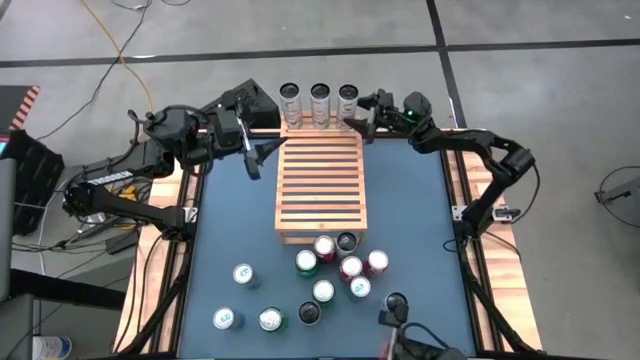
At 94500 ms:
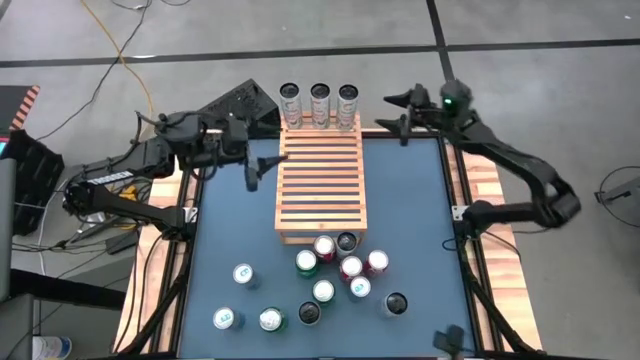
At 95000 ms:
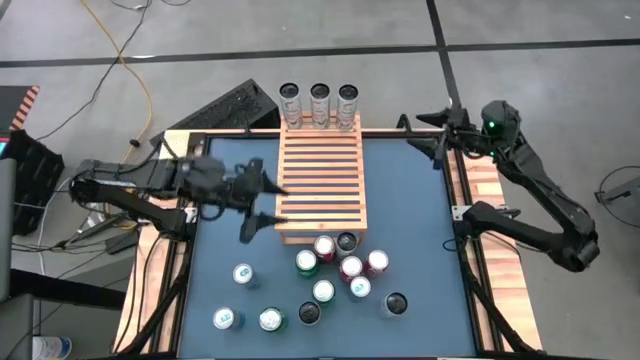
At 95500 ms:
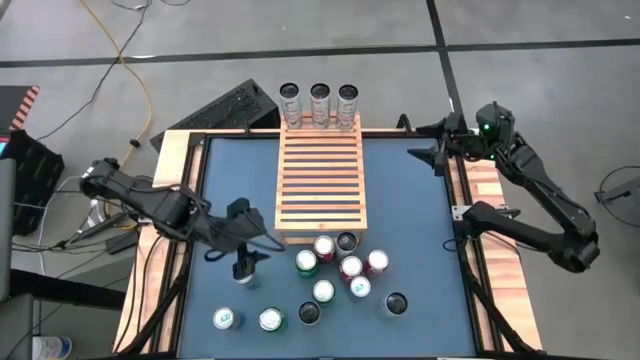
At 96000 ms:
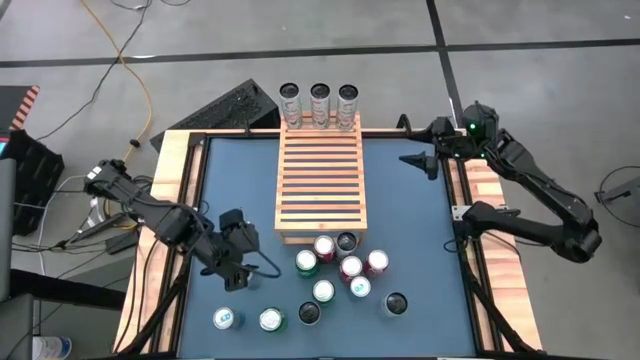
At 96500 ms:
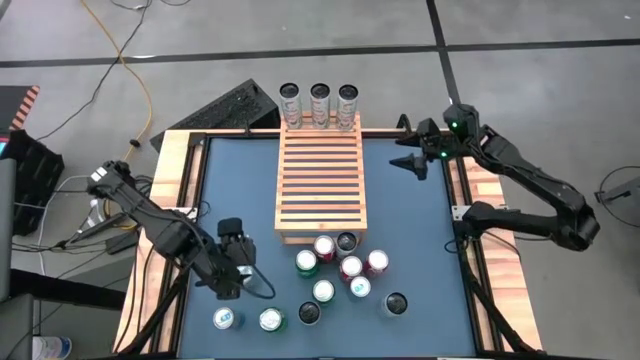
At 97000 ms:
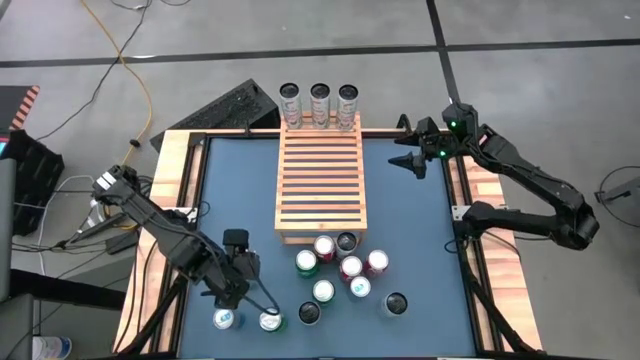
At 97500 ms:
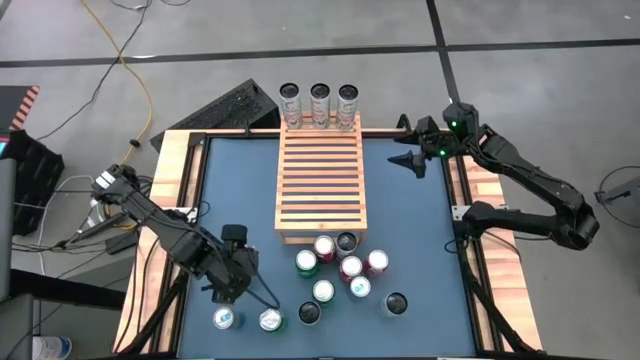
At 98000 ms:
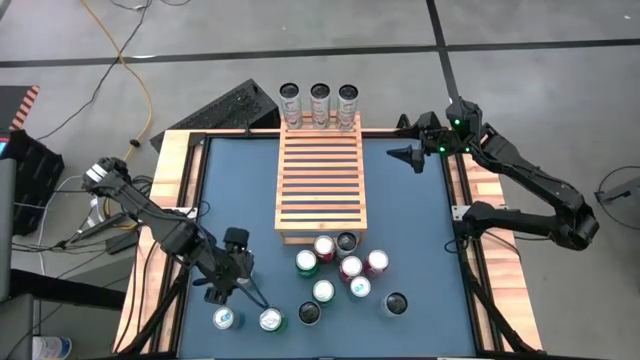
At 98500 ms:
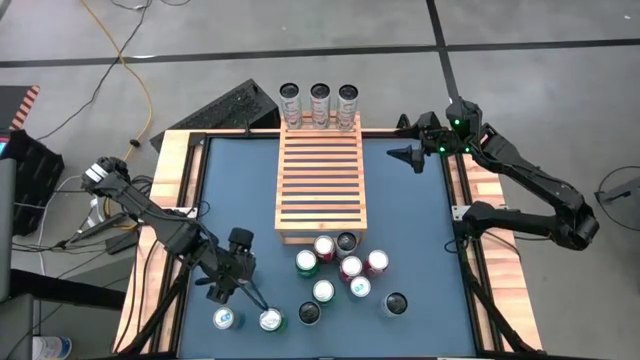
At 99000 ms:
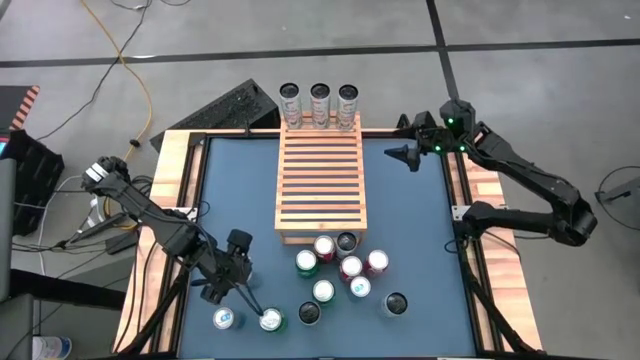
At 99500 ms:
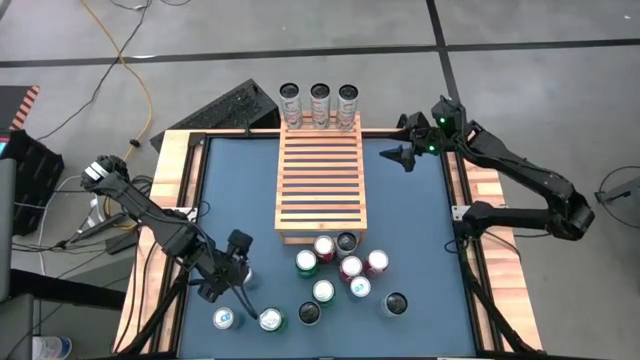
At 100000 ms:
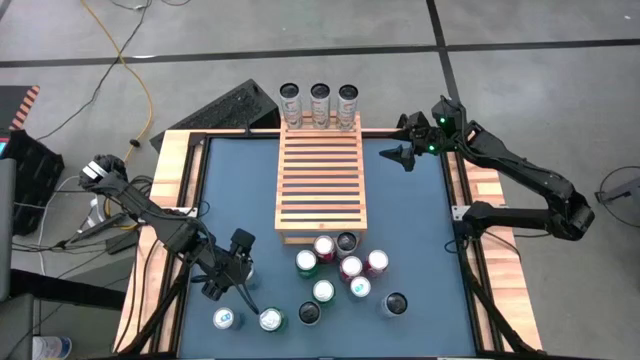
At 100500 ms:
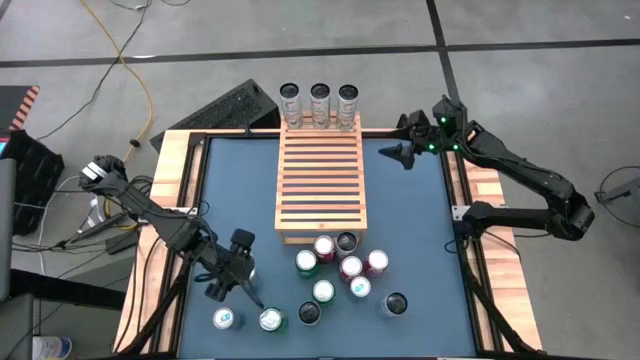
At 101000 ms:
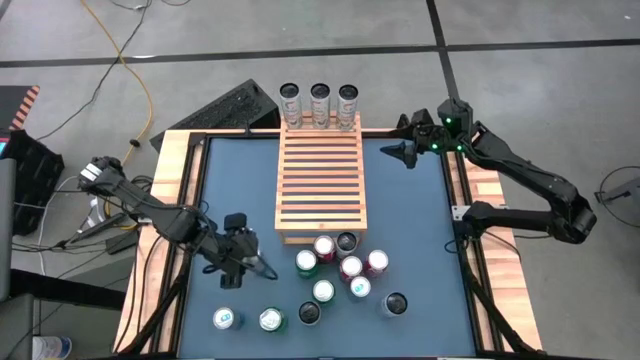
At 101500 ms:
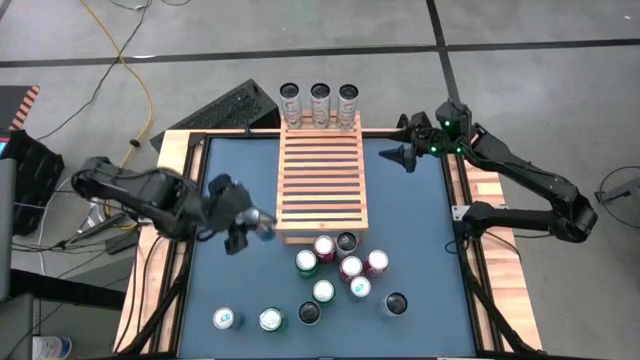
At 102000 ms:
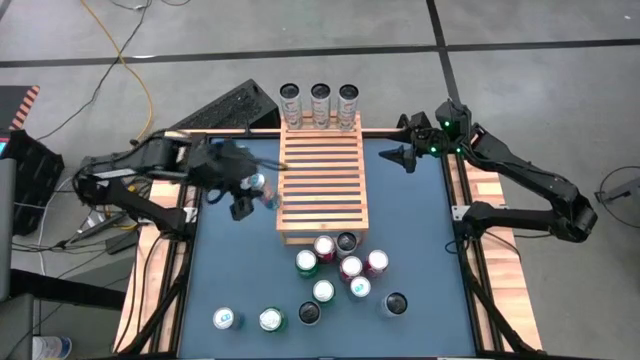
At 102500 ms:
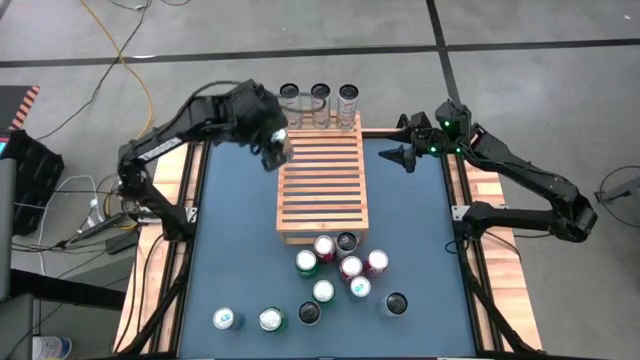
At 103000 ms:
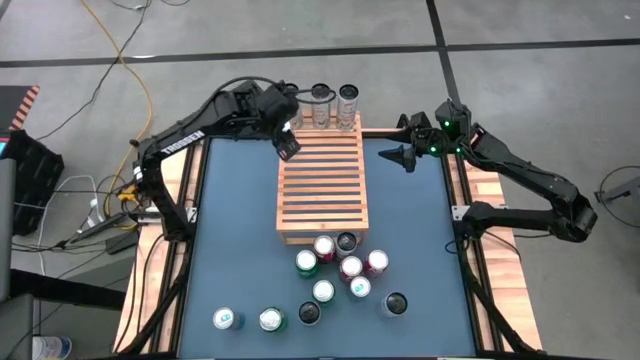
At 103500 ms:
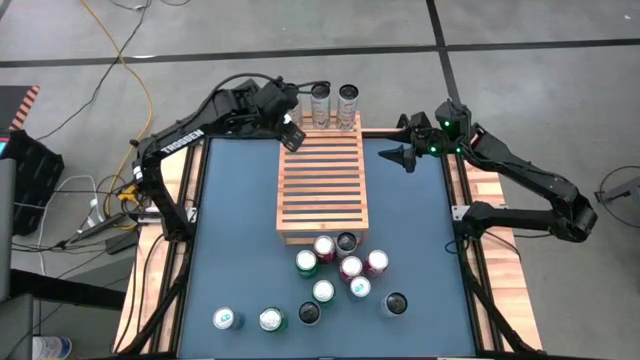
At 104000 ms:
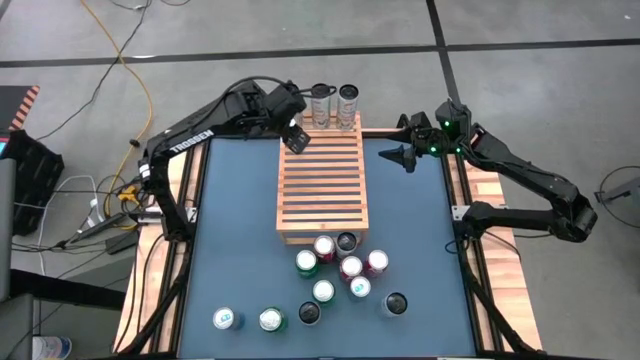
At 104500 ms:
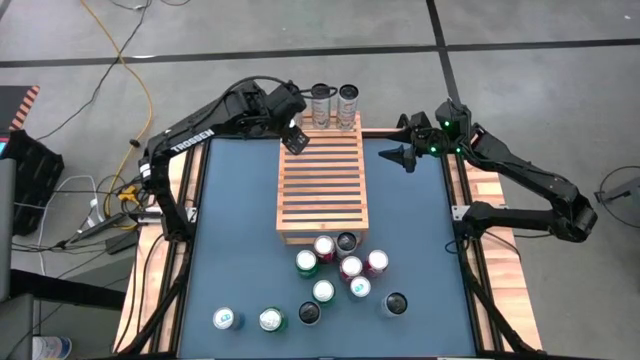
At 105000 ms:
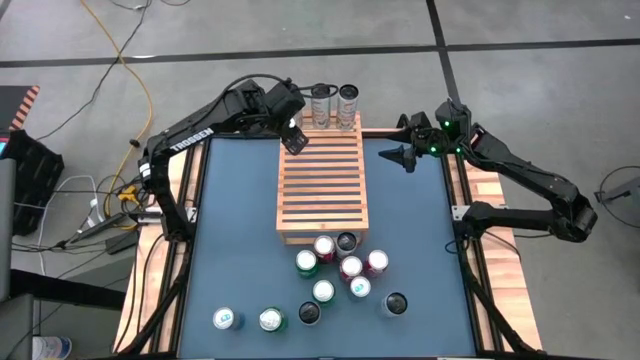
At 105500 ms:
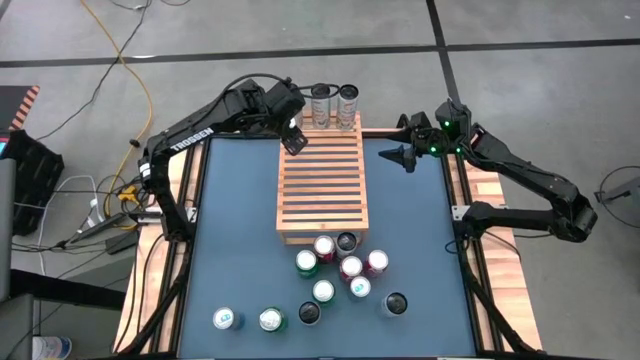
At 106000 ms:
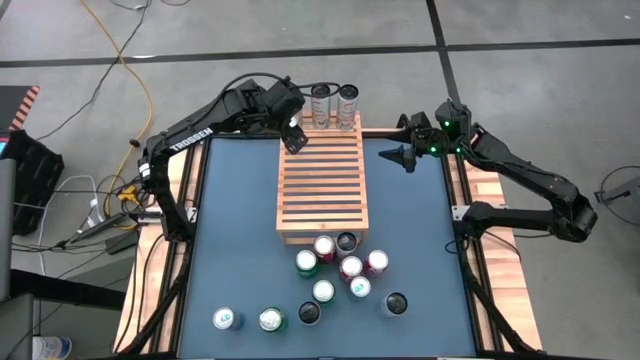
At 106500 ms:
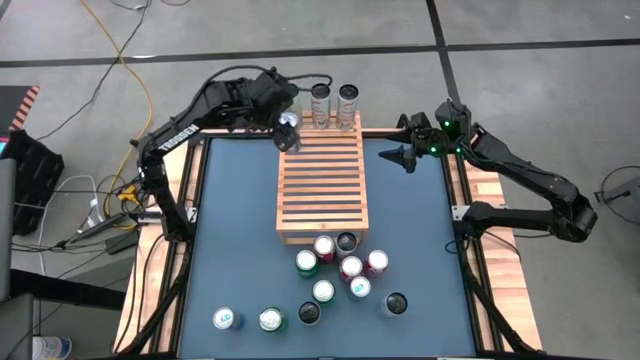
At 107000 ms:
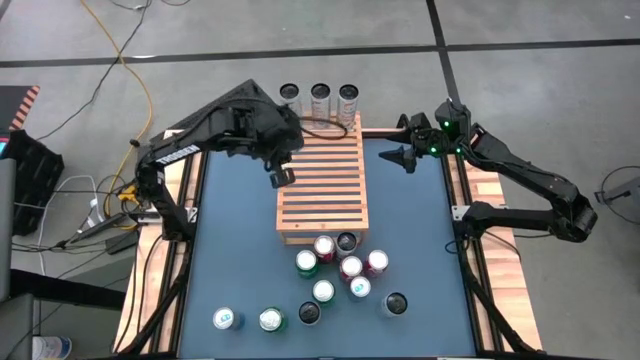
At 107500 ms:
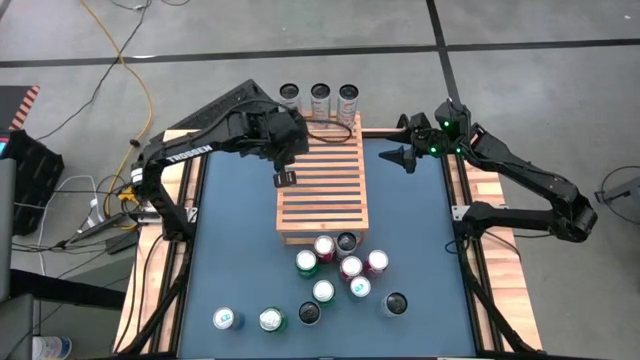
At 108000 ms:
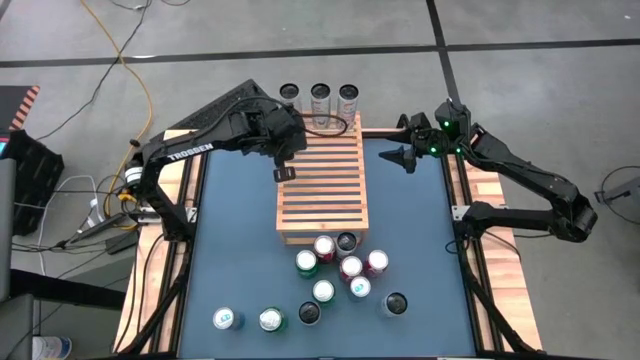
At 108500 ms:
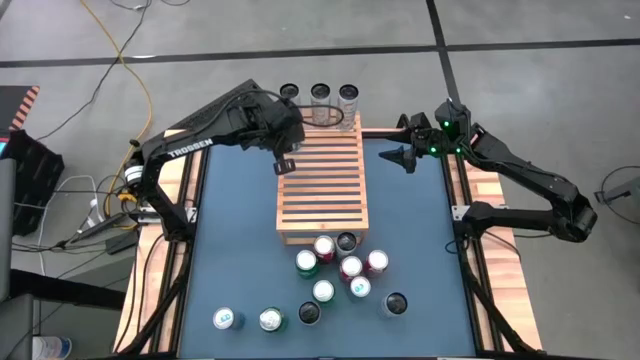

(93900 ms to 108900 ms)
Task: Place canned beverage on shelf
Put the top left blue soda can on the shelf

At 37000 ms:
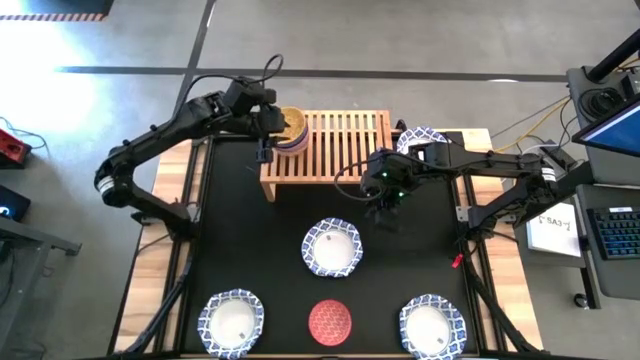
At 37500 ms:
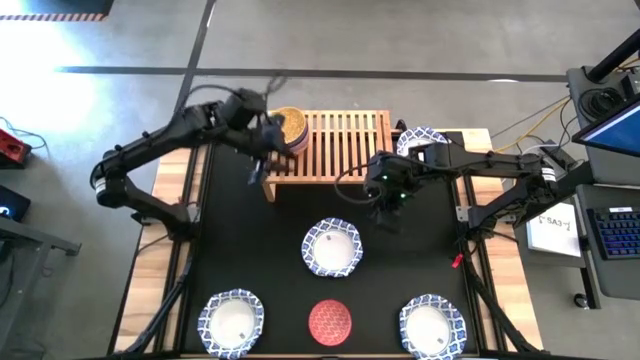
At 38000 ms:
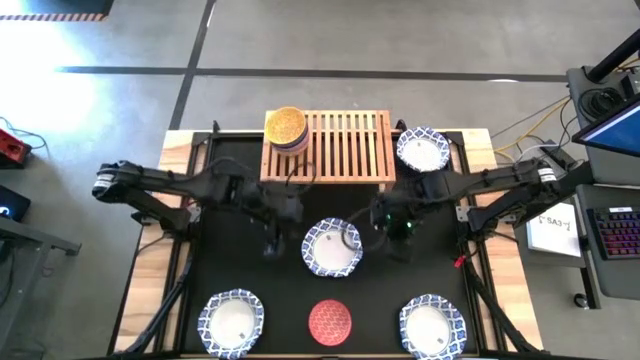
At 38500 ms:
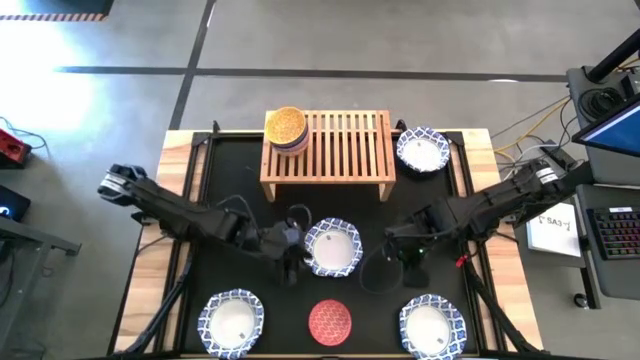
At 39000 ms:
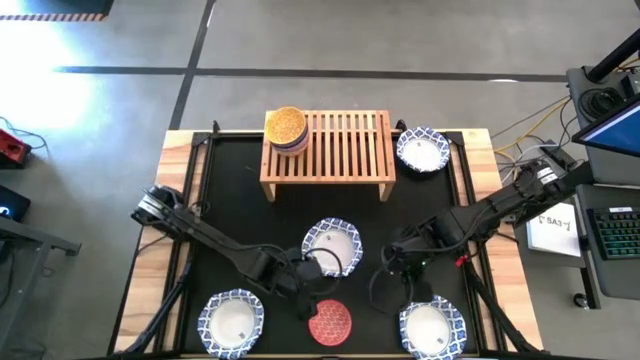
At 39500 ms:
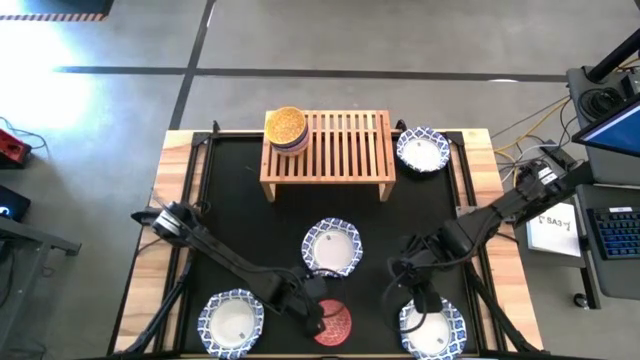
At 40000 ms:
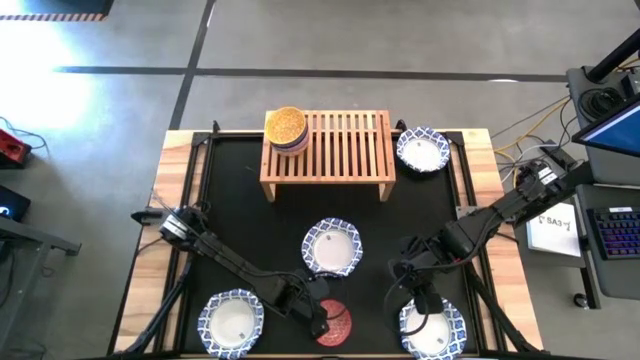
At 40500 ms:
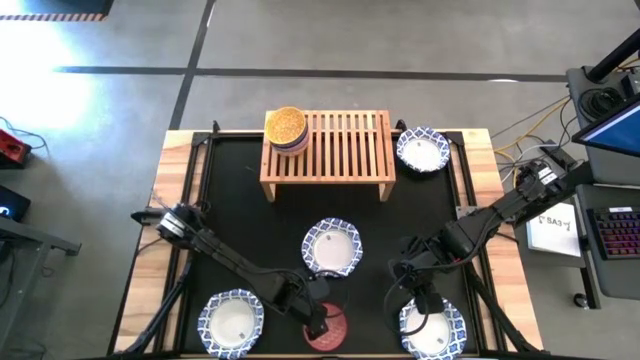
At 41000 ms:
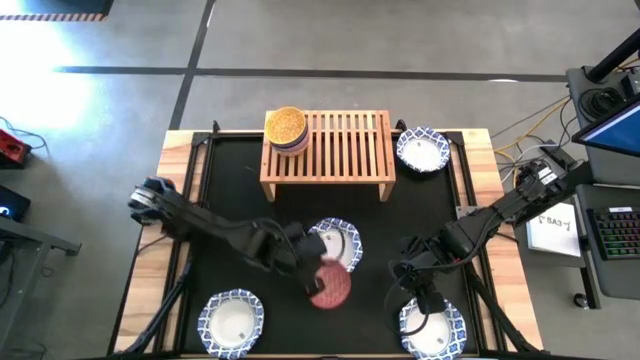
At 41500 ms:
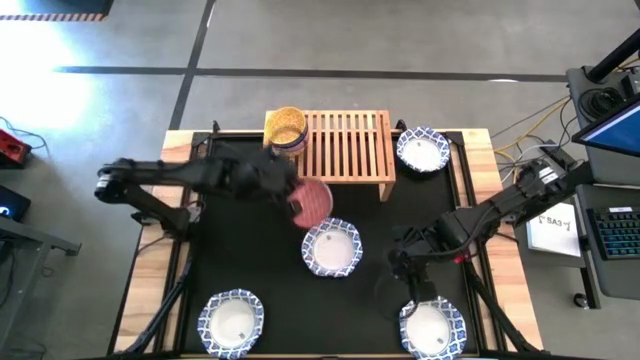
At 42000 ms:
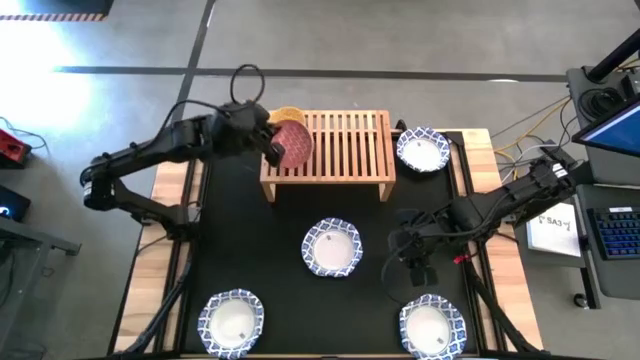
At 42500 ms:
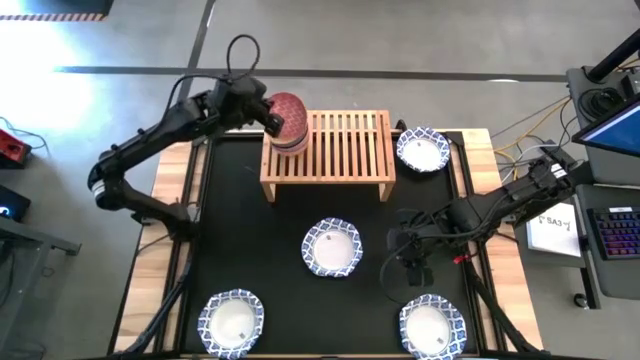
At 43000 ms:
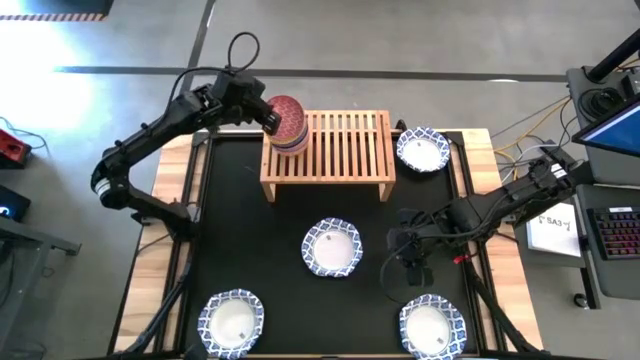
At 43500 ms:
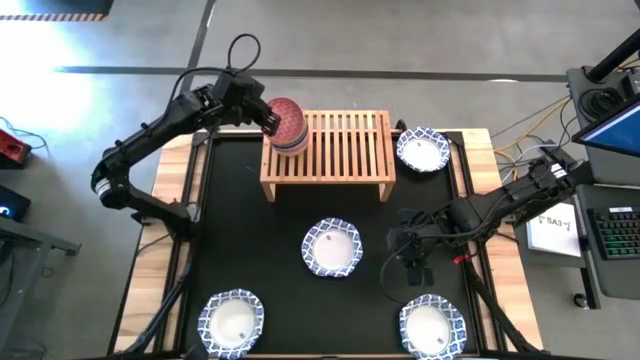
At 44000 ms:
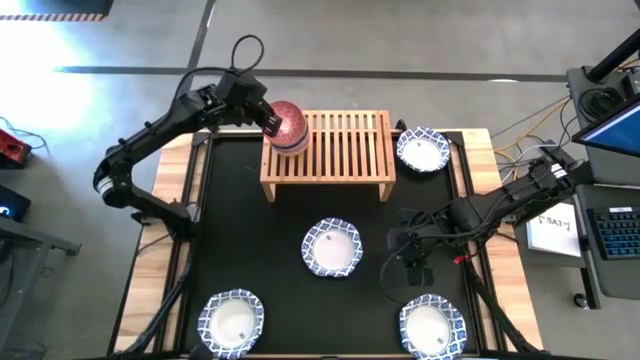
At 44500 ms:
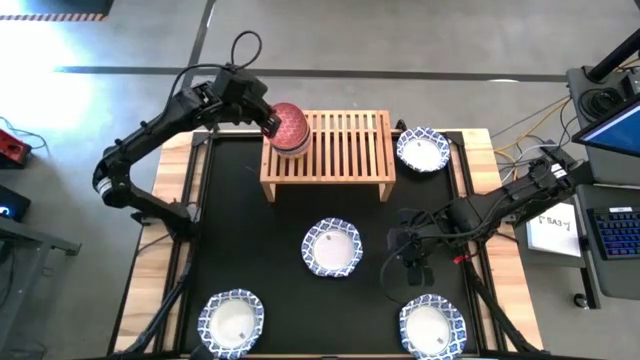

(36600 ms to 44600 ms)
Task: Place and stack bowls onto a shelf
Stack the red patterned bowl on top of the yellow bowl on the shelf
